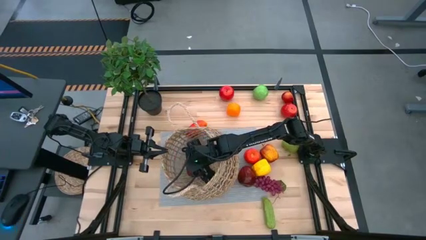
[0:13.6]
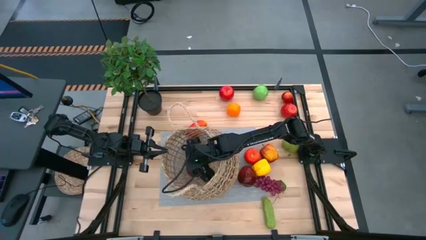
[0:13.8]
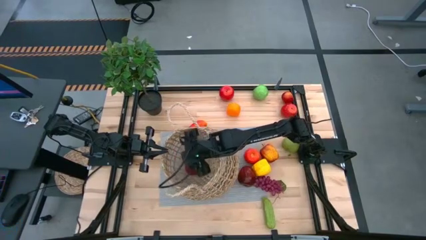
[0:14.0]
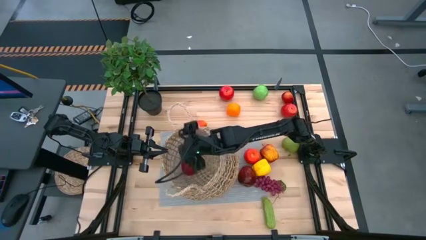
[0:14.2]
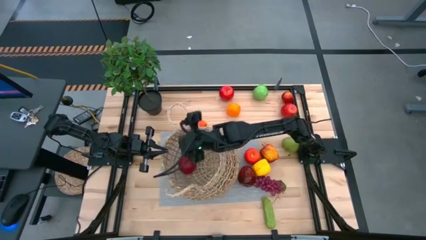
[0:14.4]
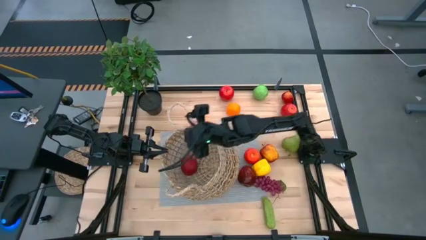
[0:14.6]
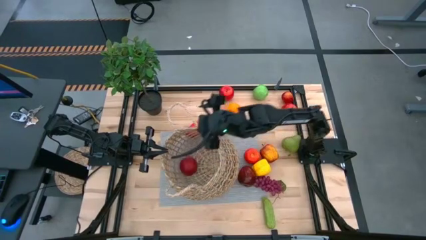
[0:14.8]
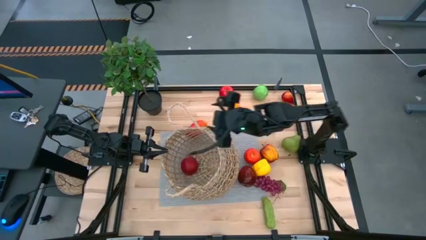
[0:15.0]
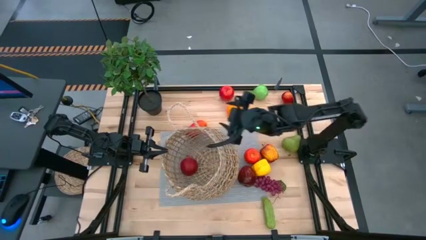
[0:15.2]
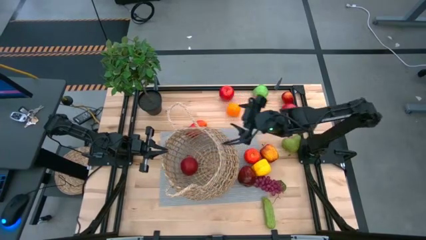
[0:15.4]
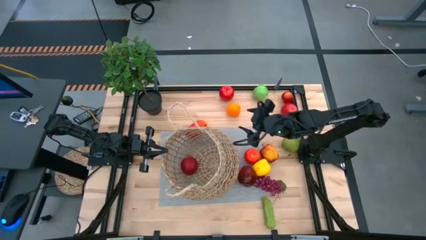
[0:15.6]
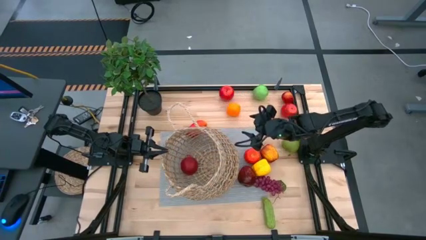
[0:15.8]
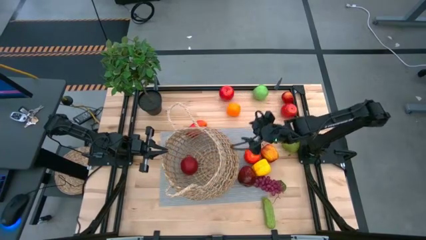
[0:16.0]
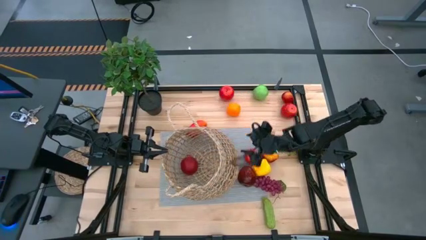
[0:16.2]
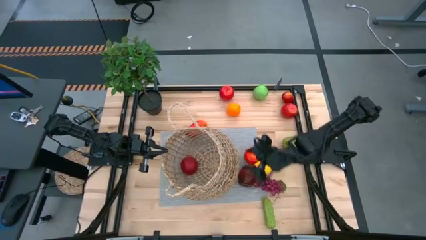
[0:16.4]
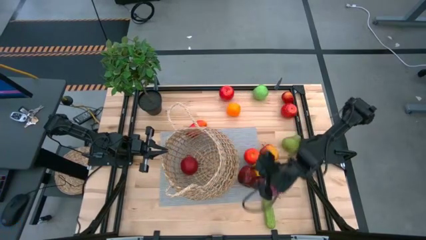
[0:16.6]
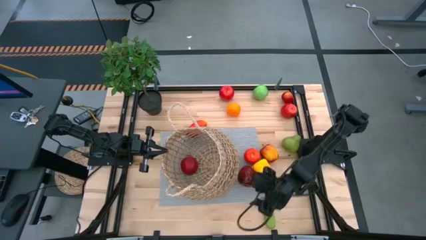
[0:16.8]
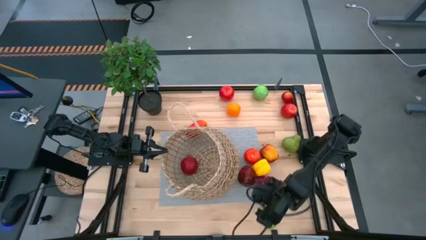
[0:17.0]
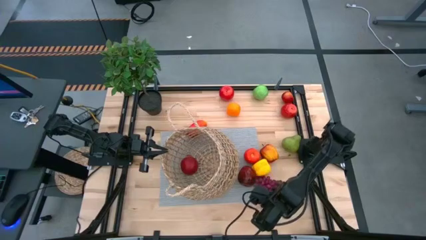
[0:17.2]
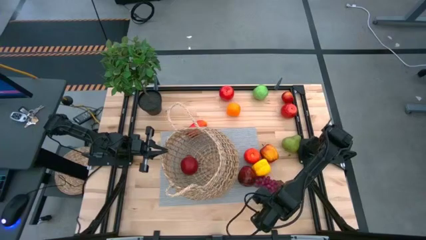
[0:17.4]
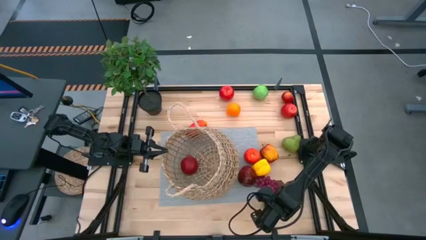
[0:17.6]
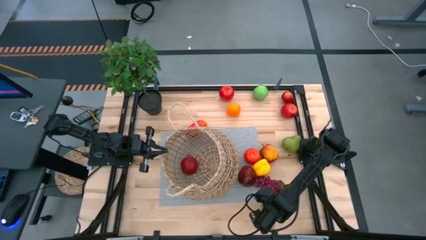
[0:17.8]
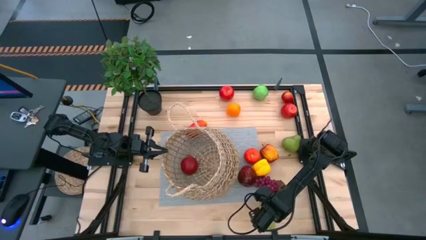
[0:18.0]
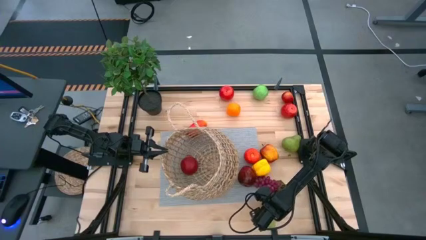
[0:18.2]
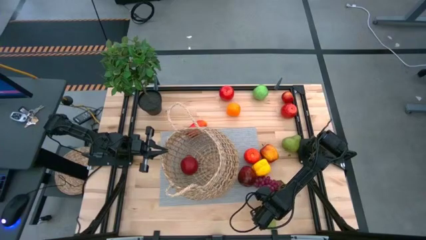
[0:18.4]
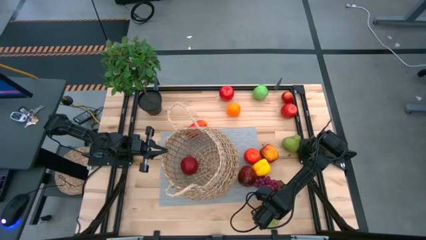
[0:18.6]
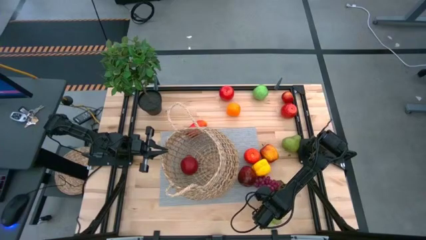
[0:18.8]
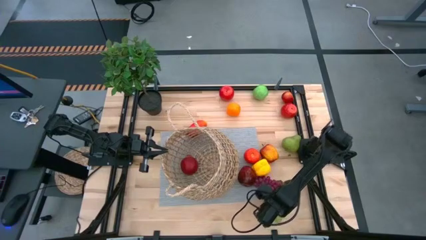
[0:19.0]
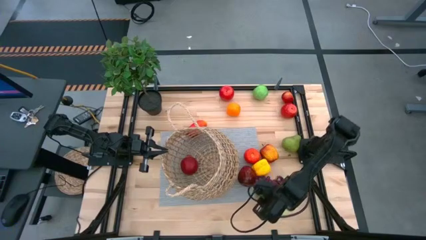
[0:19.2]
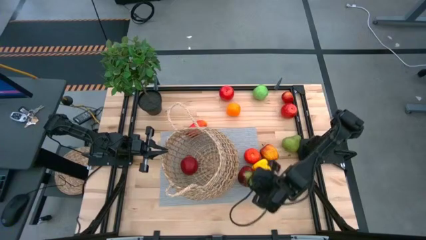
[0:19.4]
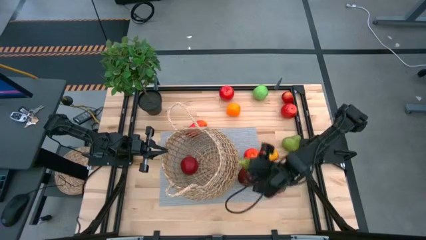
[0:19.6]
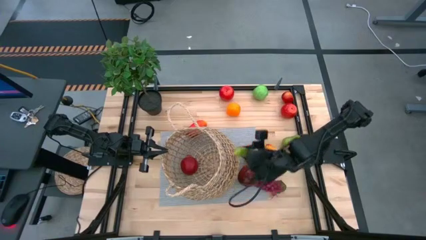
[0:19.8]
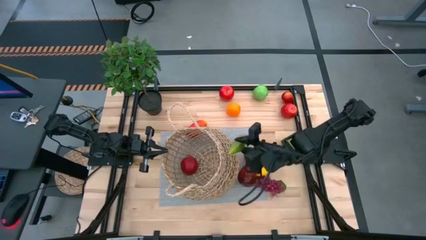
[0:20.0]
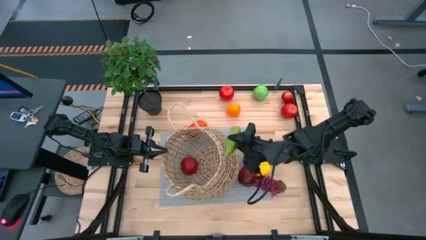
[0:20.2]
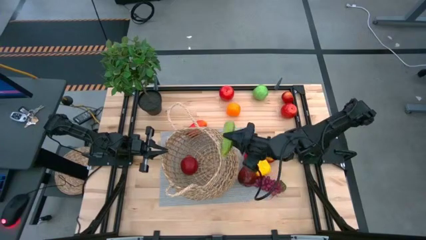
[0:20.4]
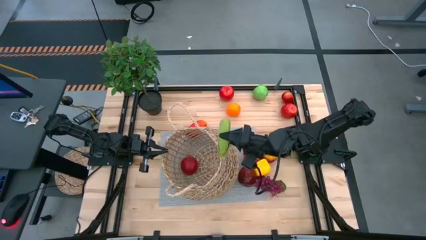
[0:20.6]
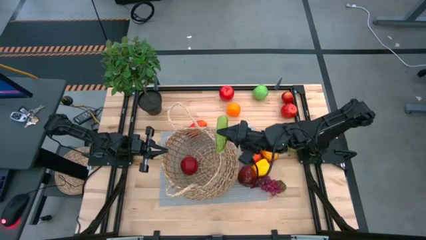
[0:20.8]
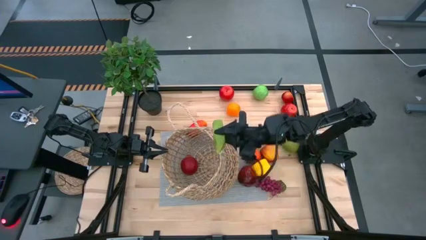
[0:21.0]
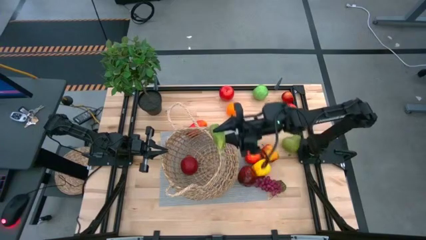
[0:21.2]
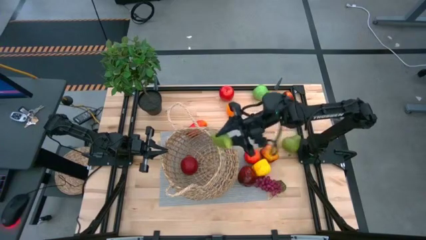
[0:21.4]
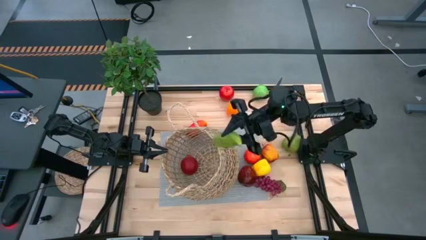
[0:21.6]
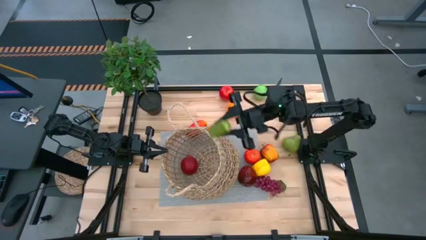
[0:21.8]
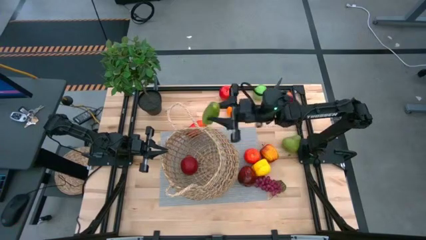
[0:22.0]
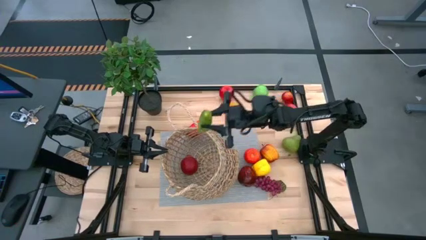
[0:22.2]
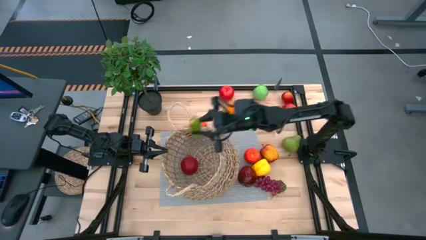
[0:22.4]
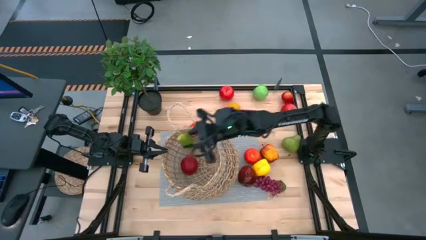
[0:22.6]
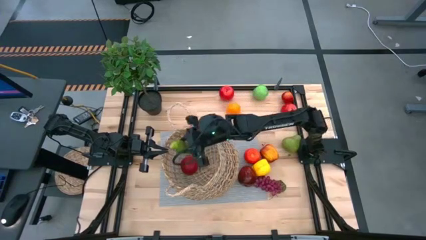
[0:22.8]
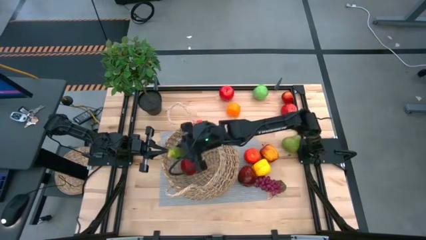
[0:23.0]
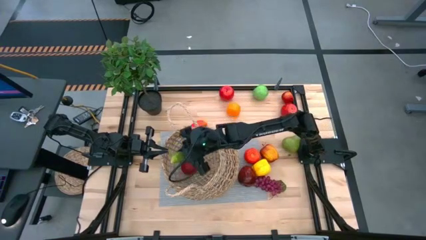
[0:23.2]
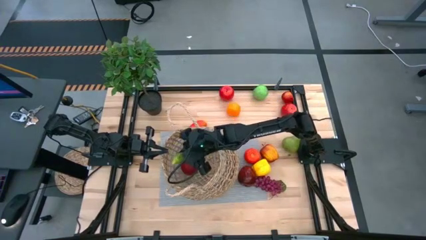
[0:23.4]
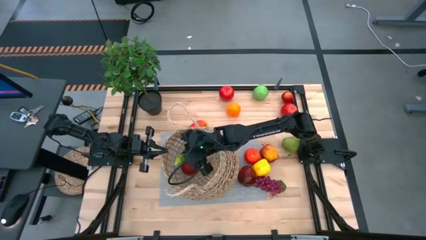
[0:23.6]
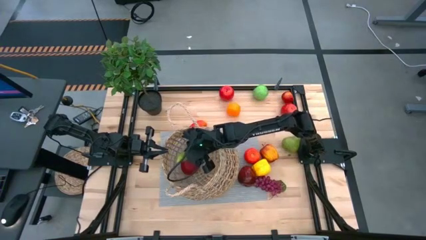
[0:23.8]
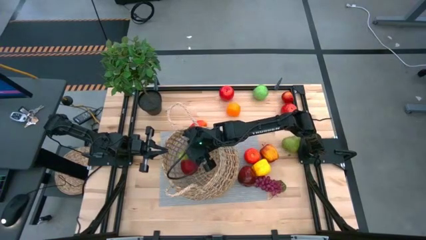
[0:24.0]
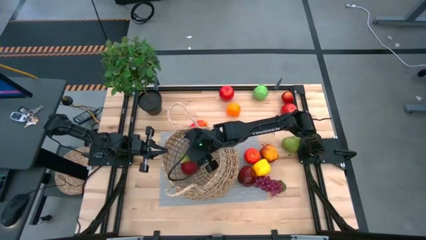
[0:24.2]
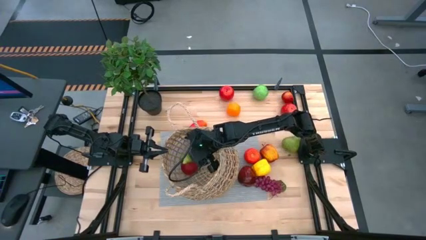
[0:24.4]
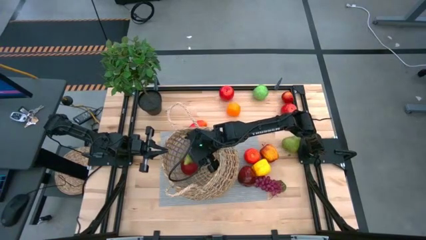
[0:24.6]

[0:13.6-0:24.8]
Task: Build produce basket
Put the green cucumber into the brown woven basket

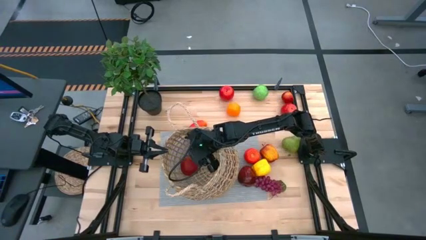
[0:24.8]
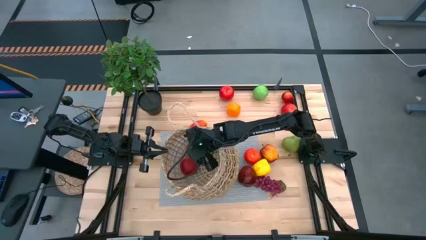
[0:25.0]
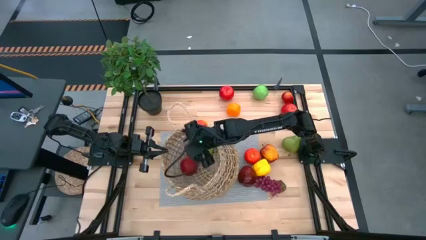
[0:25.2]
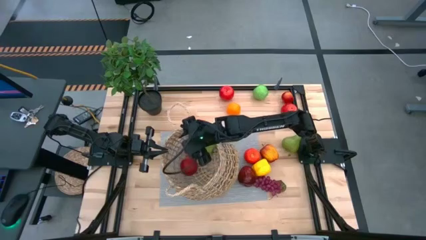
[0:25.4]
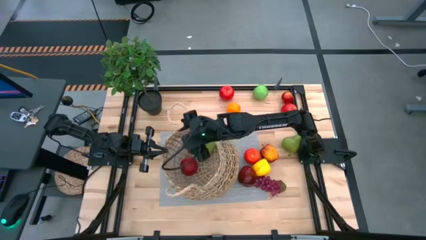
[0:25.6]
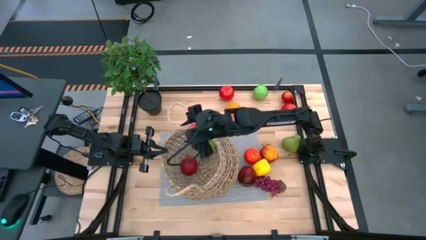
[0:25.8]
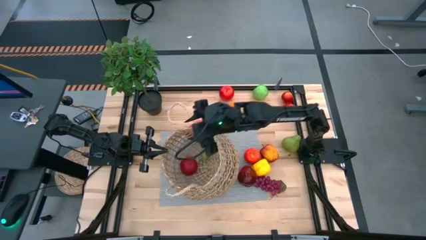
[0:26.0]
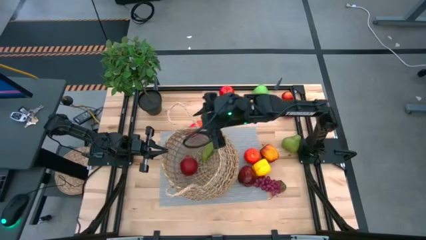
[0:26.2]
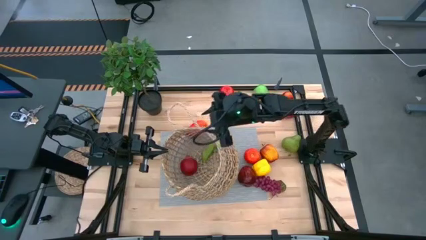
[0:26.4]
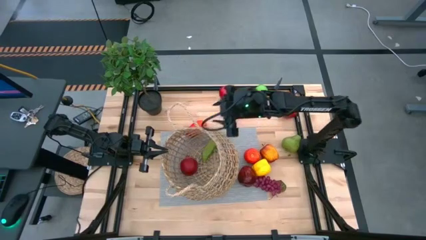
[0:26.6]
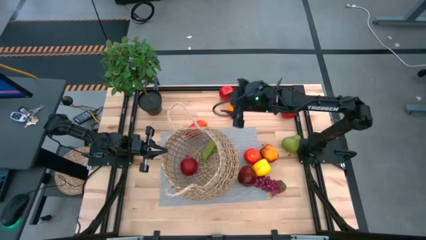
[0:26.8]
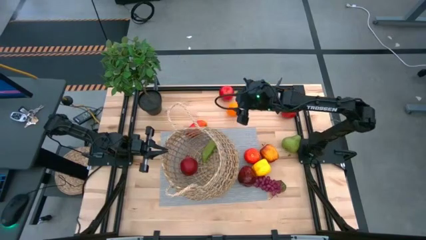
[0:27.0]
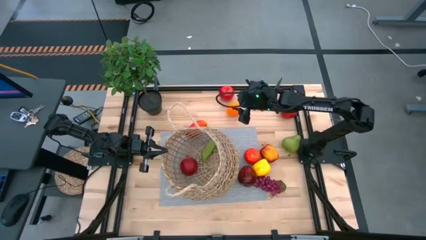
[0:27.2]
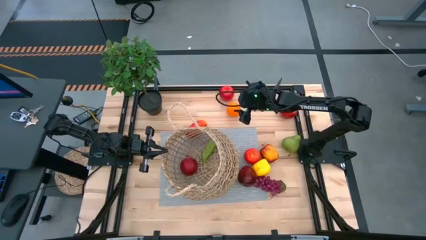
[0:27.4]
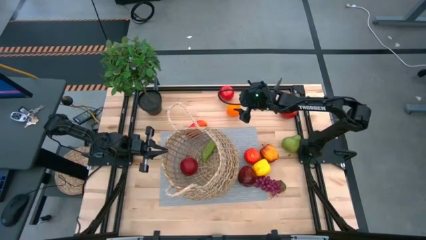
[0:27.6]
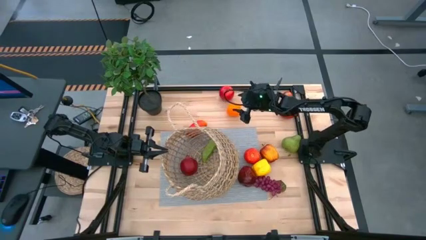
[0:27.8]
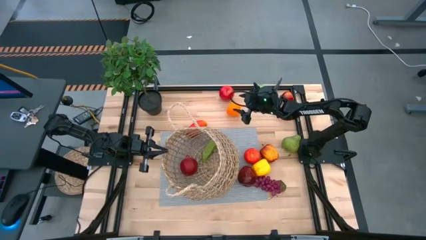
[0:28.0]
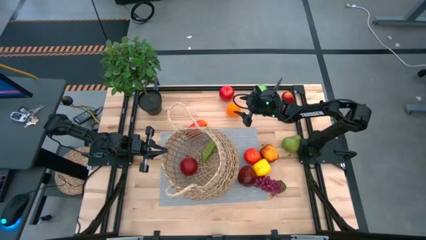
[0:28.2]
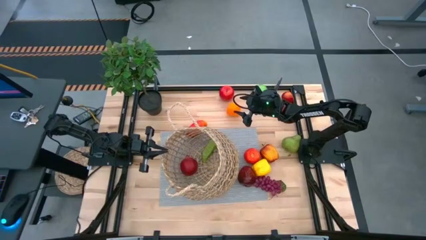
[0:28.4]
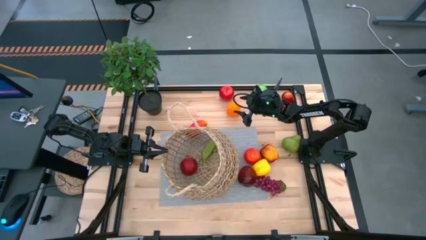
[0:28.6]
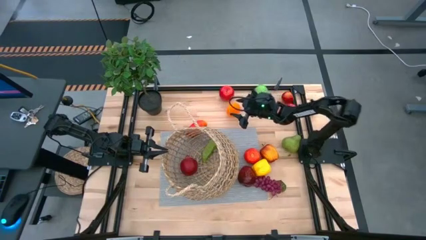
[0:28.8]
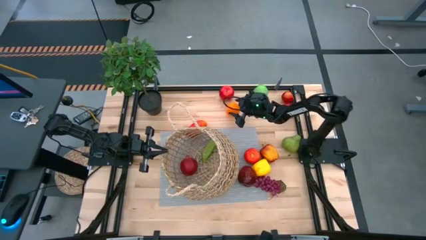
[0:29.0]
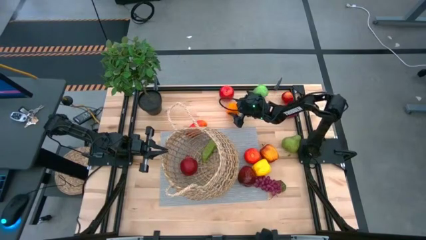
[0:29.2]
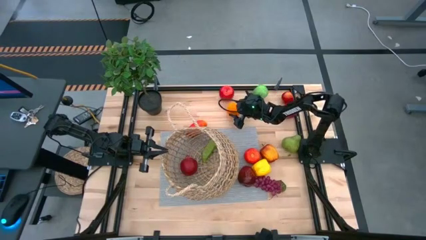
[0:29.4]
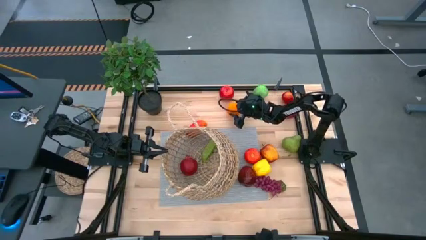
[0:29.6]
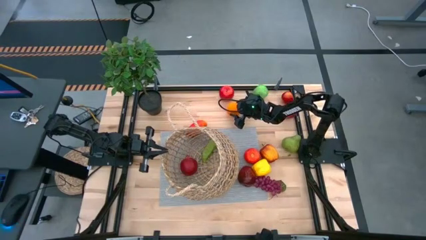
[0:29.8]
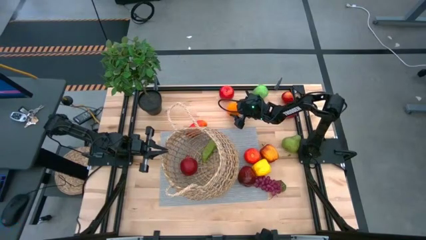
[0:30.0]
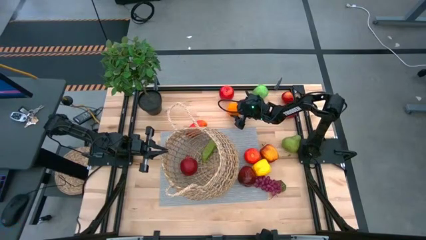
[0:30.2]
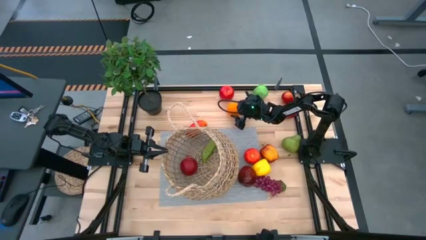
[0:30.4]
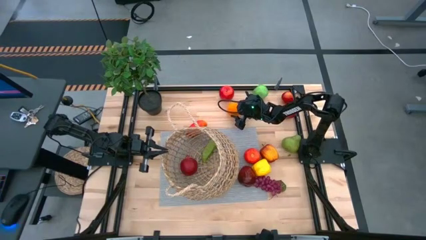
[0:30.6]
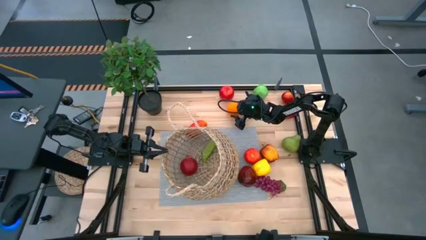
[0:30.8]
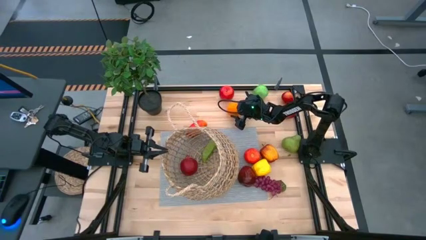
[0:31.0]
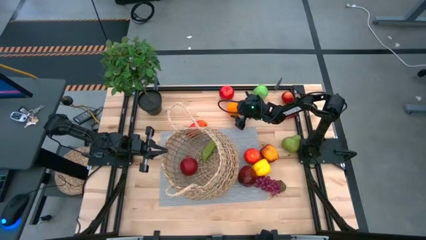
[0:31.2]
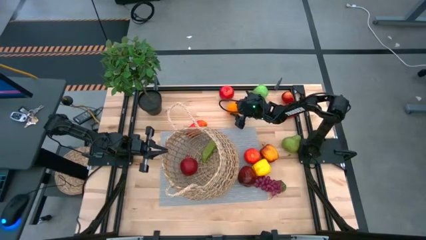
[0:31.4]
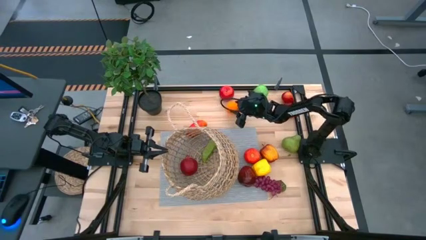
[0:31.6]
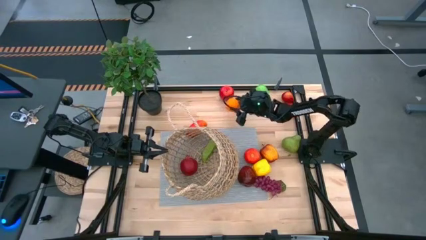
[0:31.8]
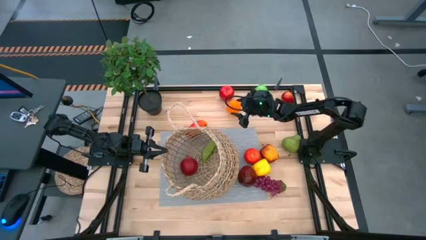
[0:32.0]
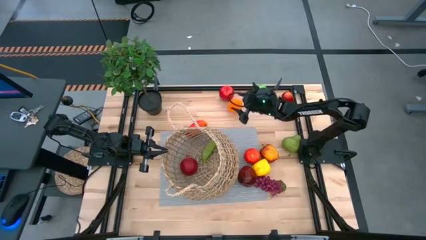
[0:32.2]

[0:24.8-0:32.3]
Put the orange into the brown woven basket
